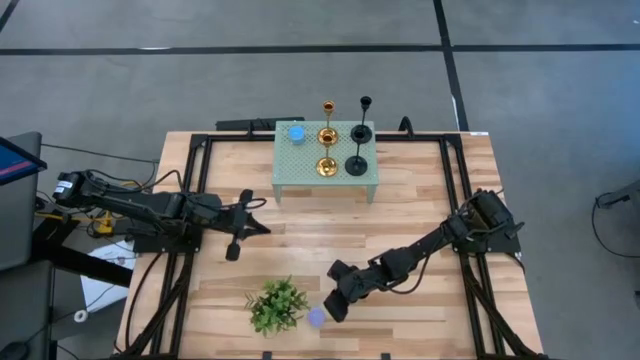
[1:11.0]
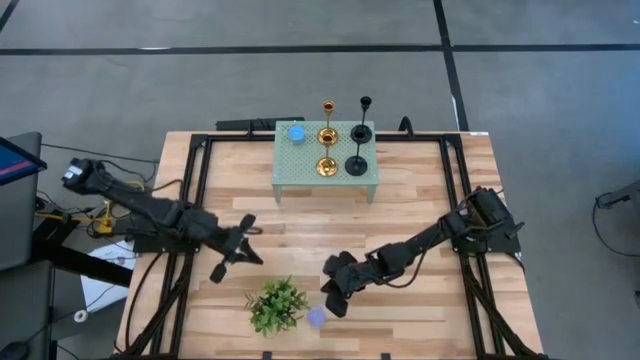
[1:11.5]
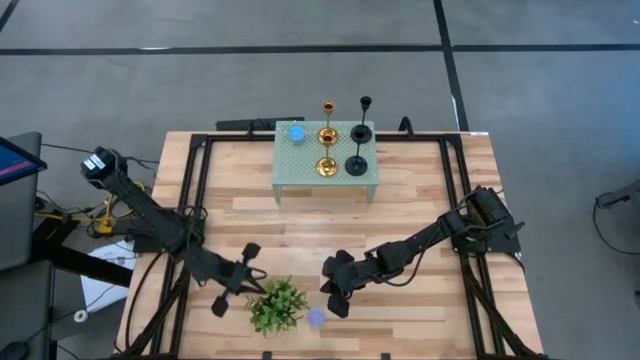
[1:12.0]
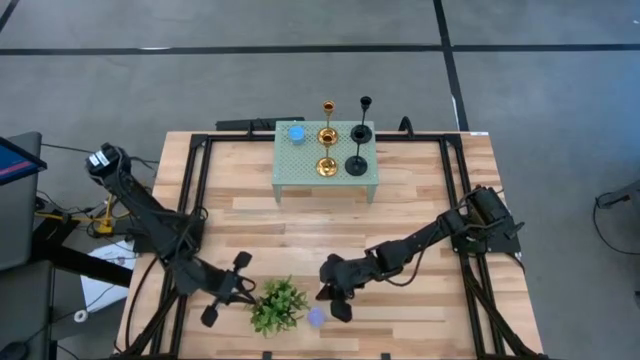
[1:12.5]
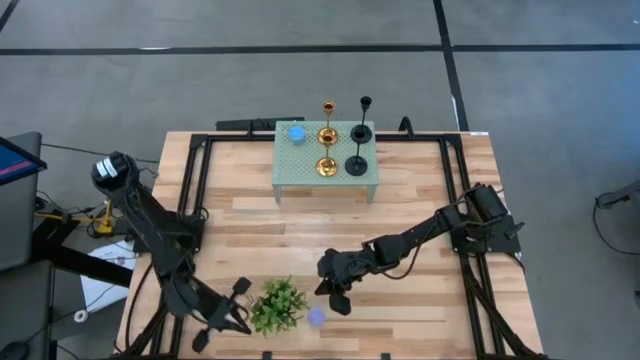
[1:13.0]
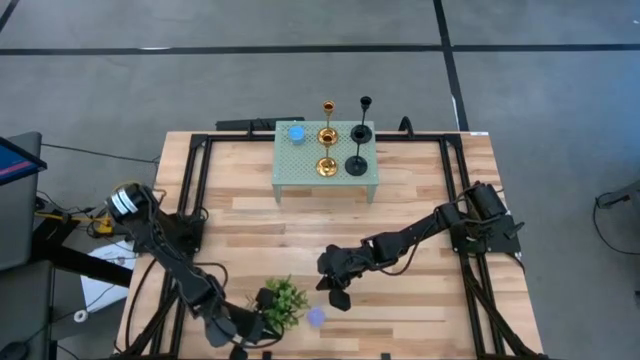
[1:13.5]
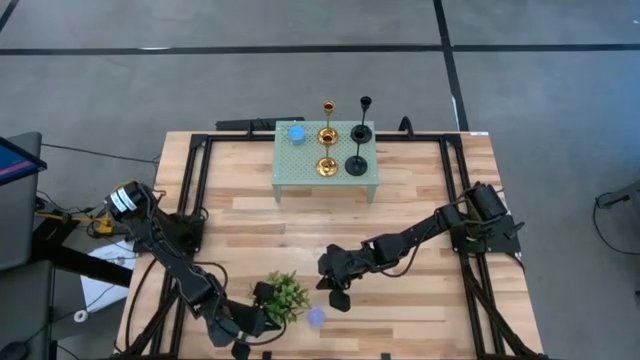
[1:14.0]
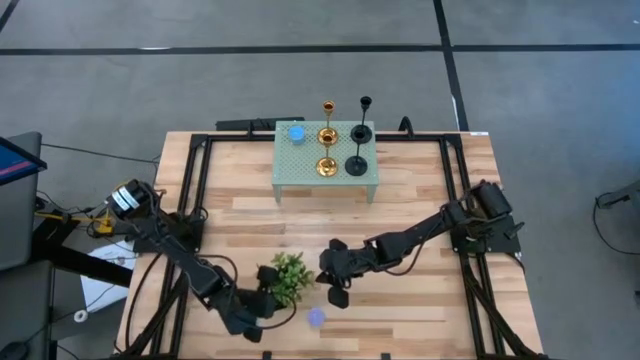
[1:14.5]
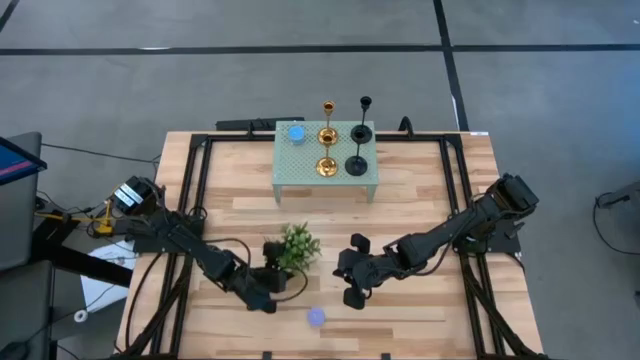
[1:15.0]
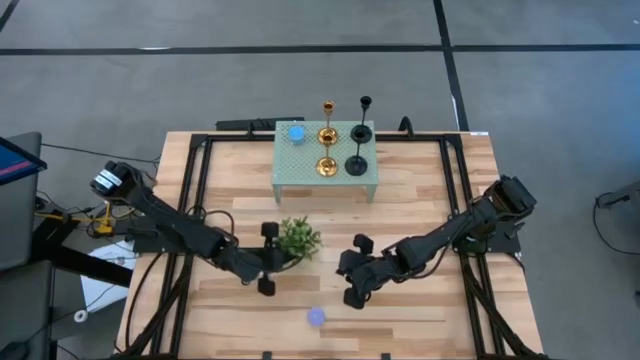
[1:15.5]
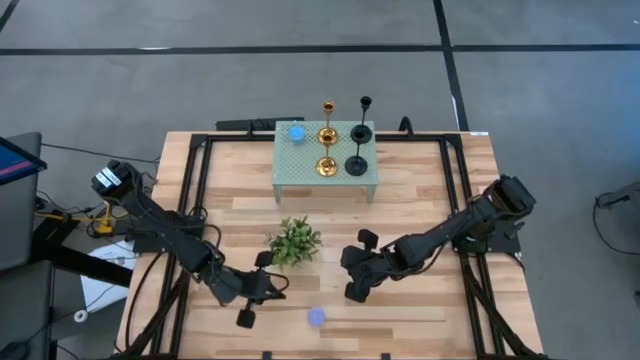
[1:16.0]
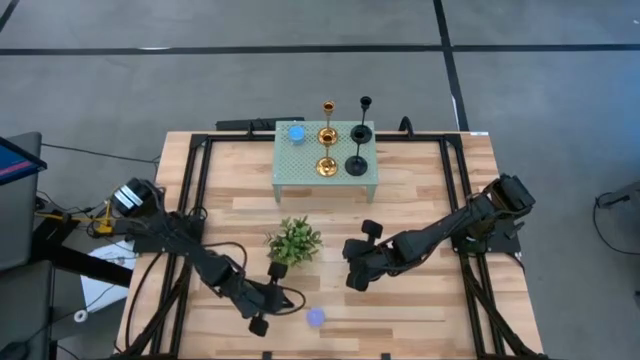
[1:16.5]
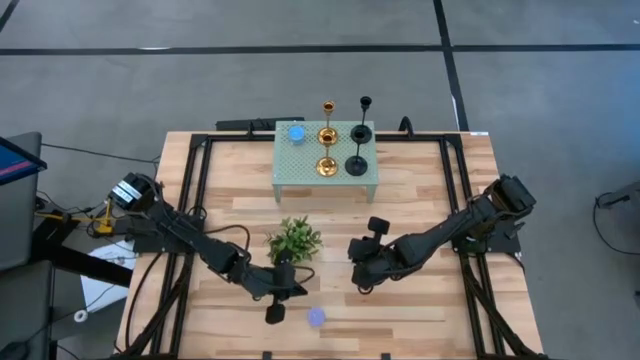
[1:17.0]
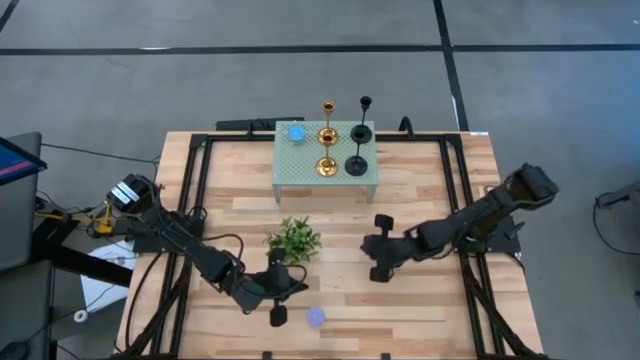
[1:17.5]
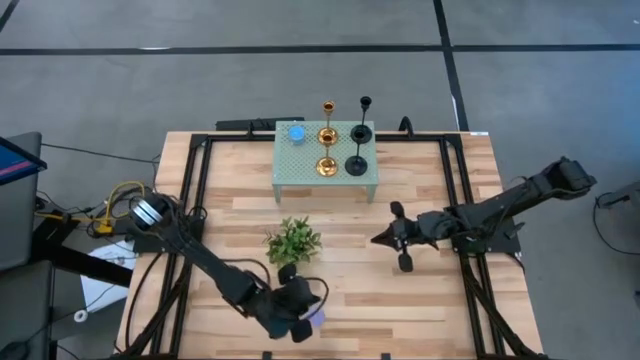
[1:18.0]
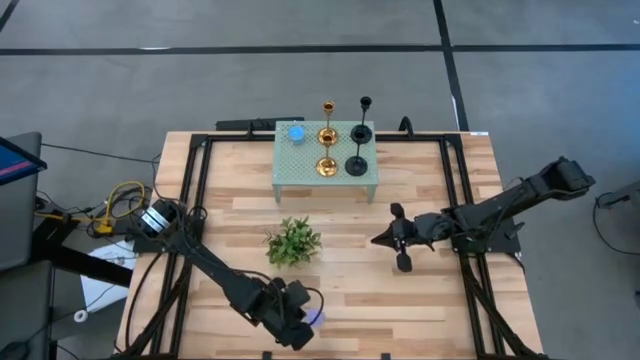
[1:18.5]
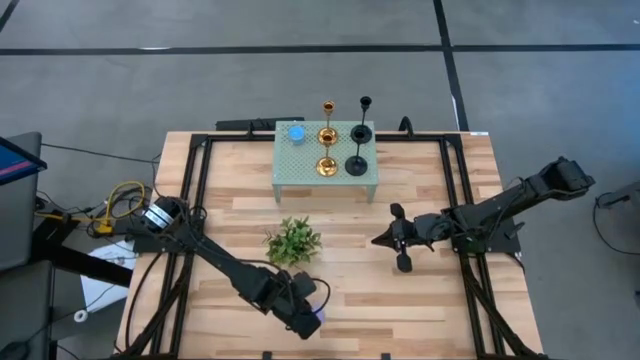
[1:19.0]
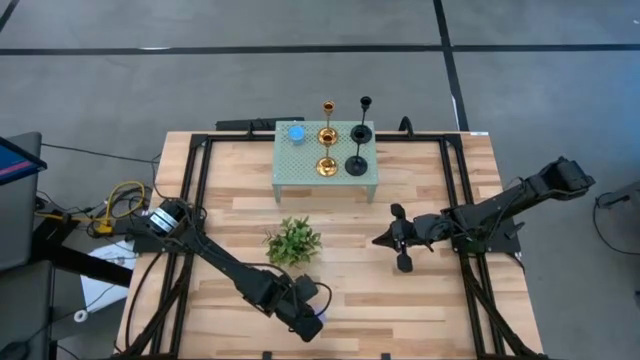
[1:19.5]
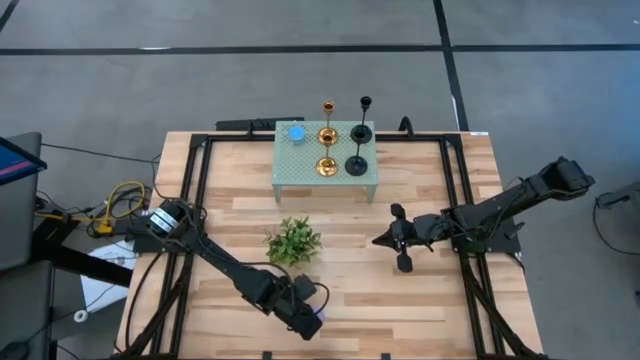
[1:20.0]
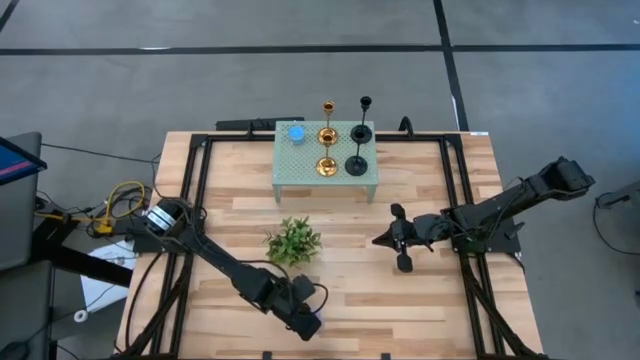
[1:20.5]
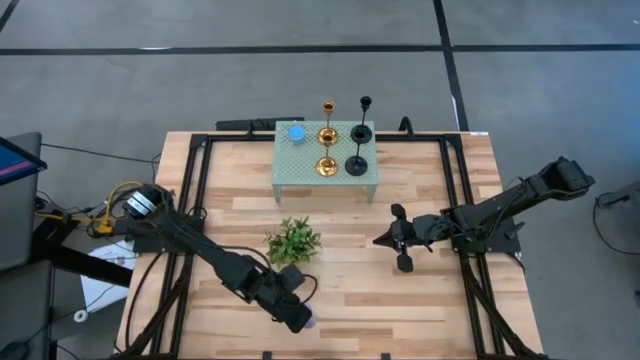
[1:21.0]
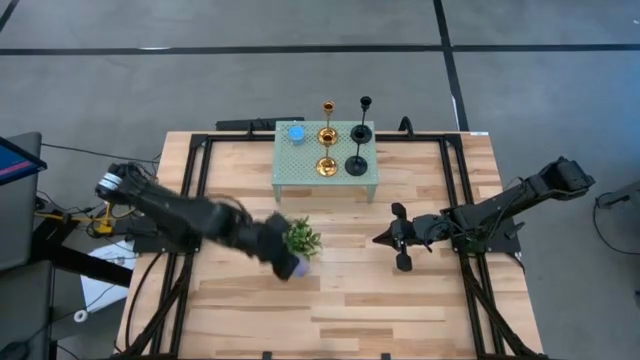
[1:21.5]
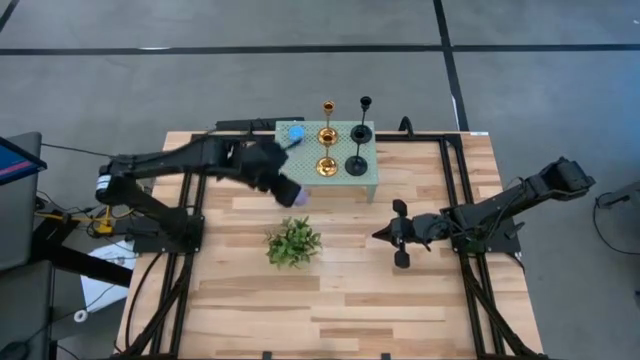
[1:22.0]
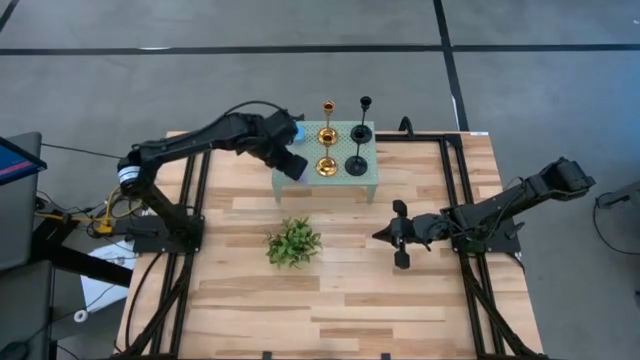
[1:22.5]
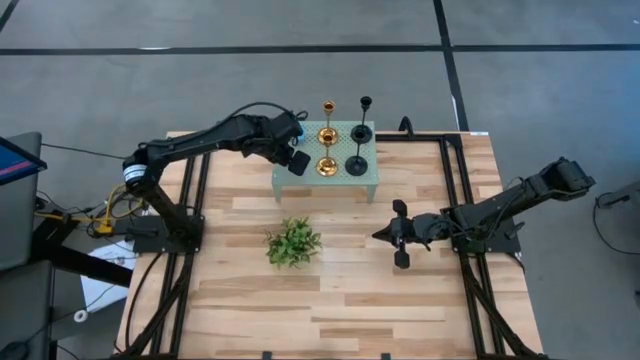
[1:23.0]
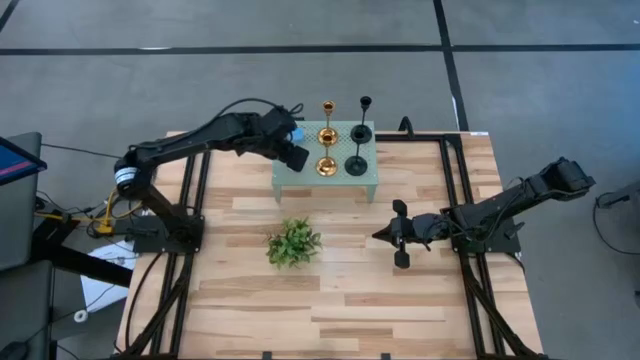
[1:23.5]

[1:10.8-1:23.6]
Task: Pick & Place candle stick holders
Put the violet candle on the shelf

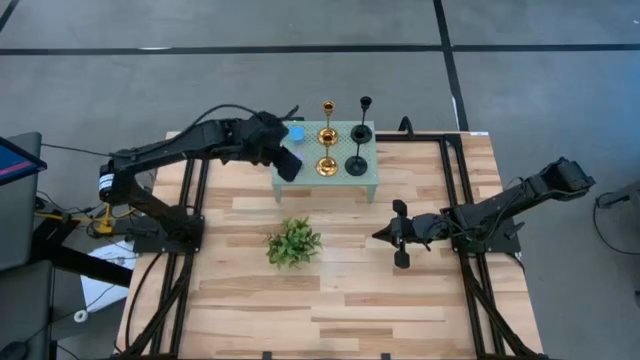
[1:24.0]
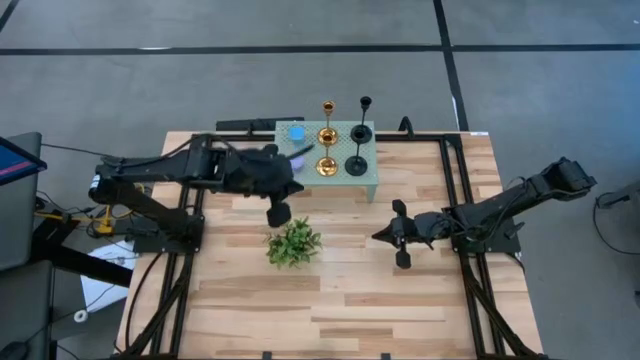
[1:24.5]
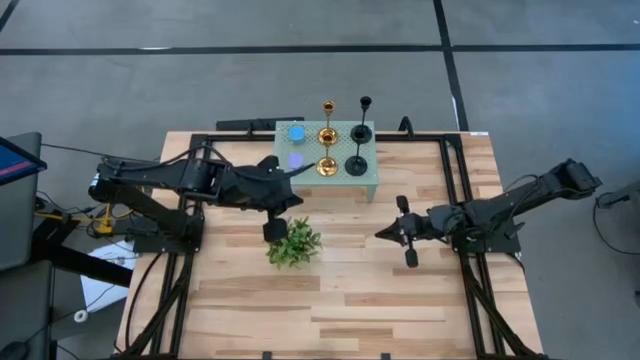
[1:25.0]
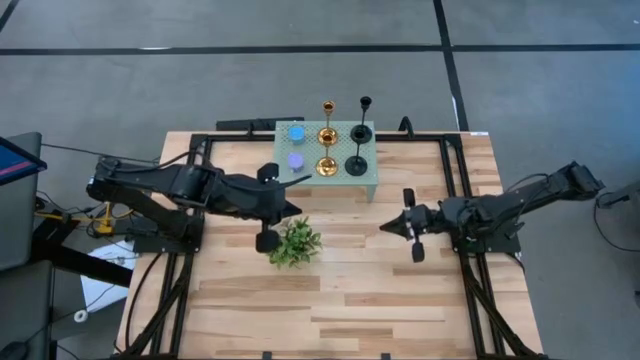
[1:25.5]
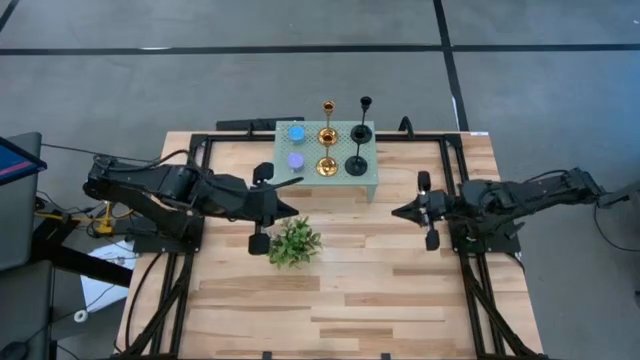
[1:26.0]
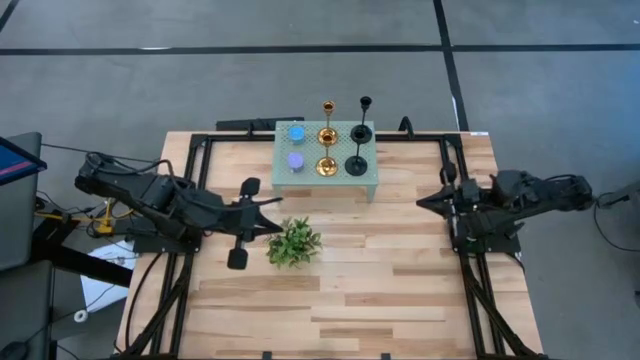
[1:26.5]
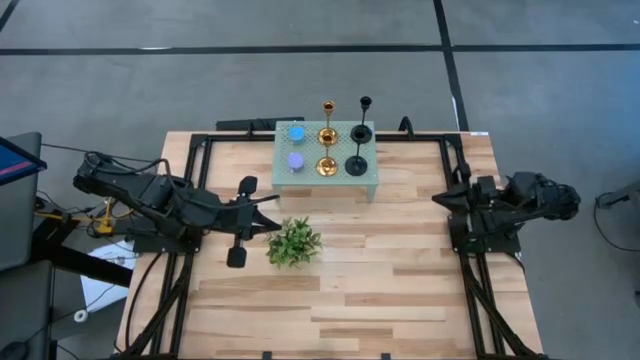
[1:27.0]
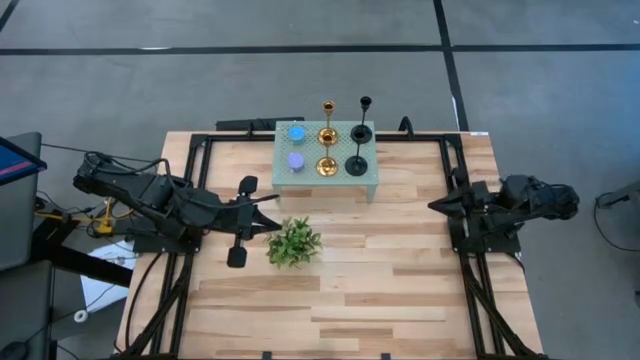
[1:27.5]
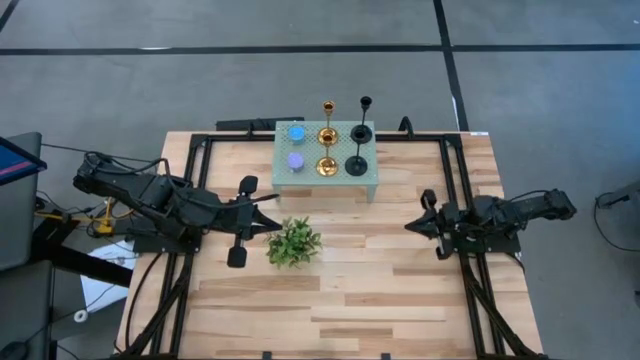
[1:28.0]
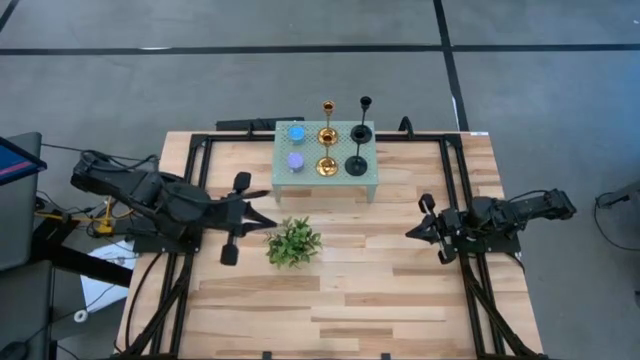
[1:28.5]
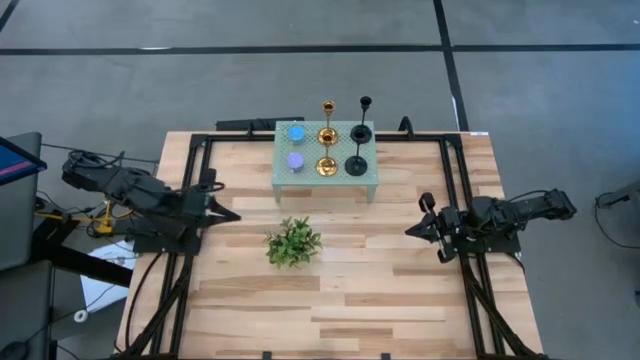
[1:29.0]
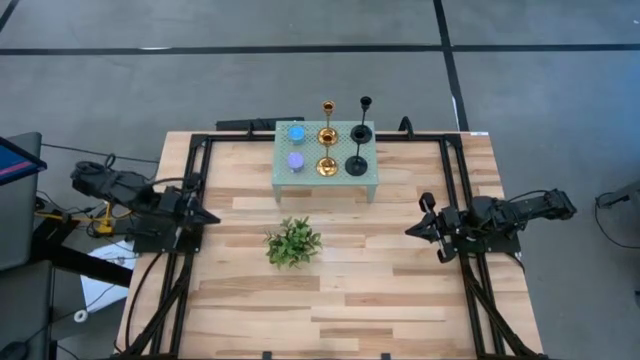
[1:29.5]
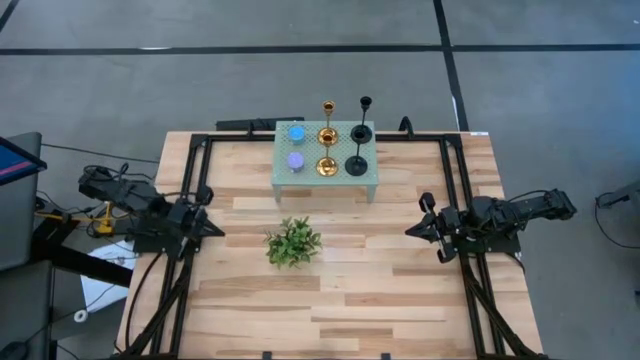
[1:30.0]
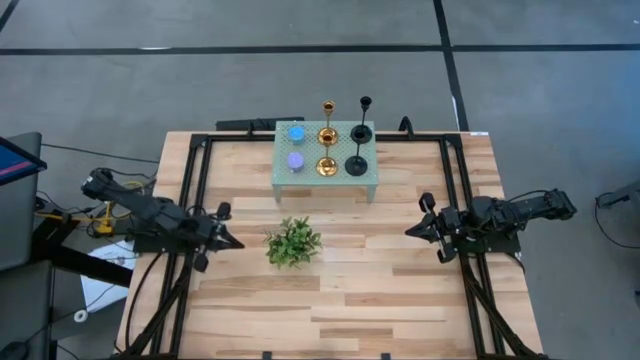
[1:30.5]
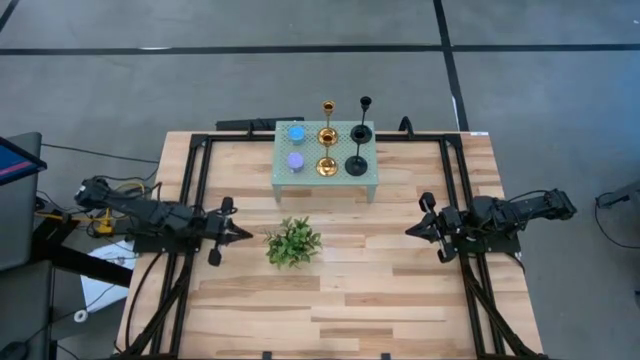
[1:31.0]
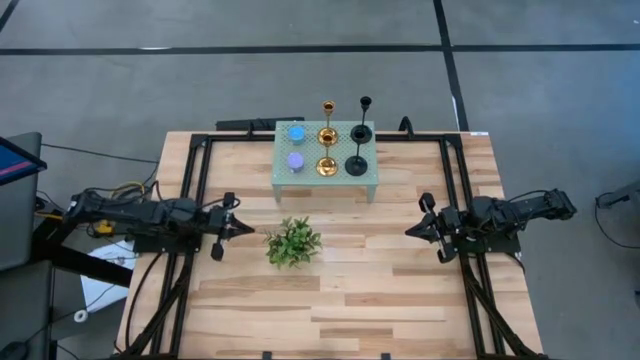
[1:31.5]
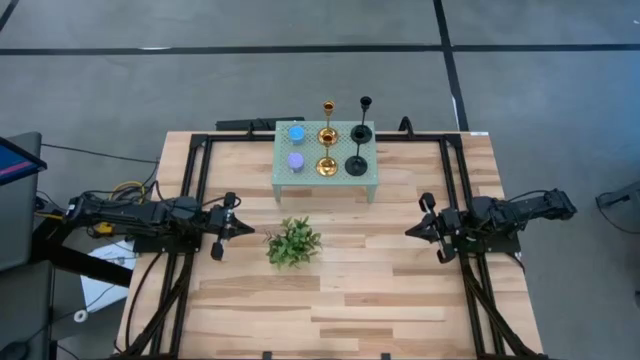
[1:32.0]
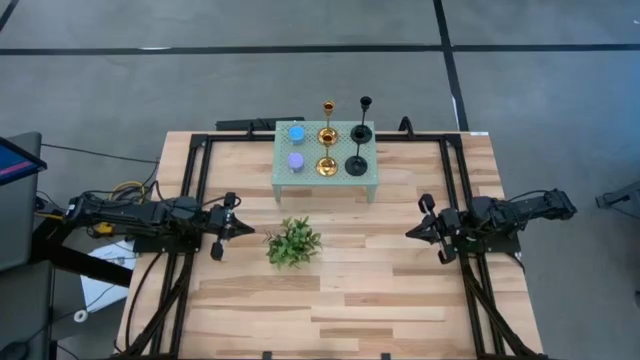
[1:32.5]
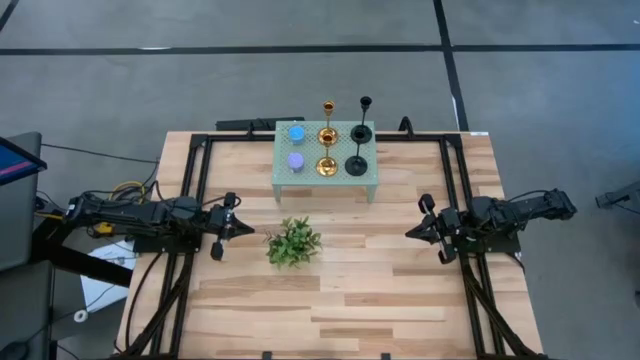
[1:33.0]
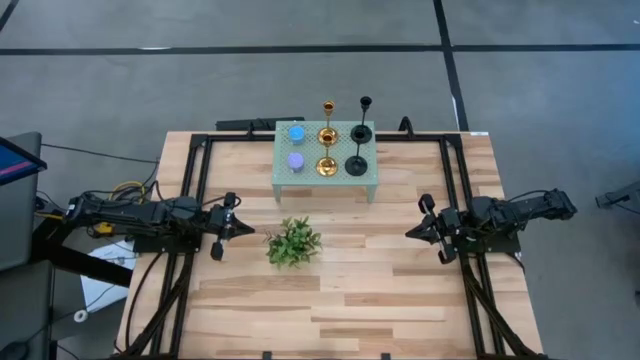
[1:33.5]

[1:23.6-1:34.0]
Return to Home Position
